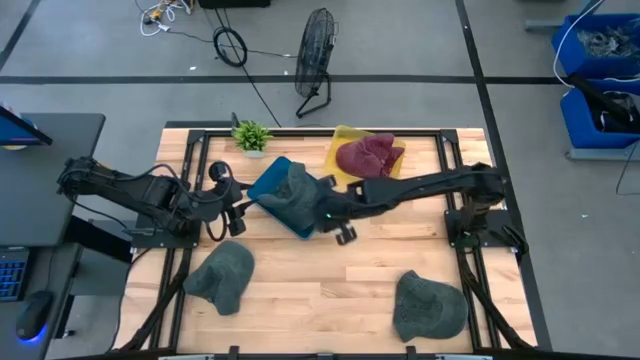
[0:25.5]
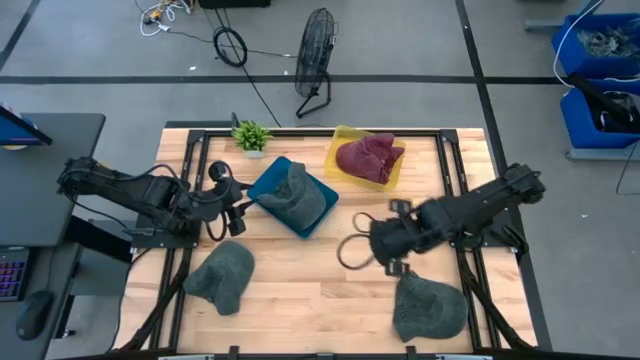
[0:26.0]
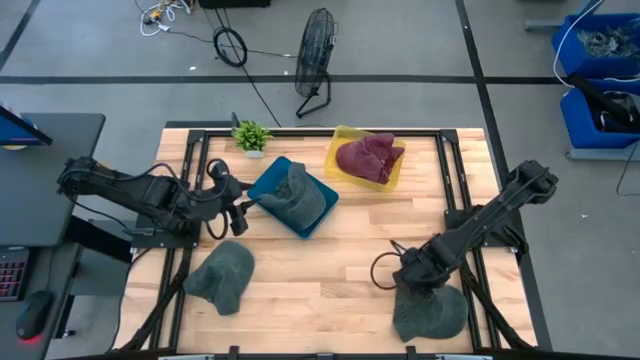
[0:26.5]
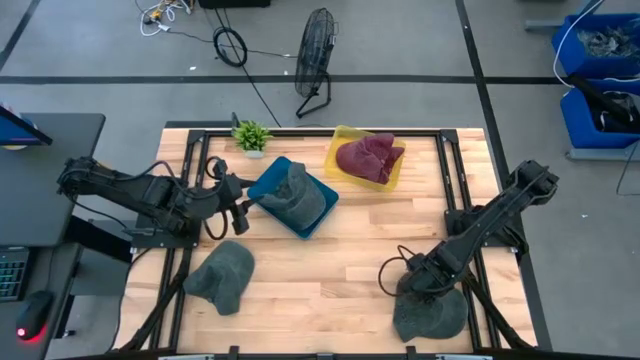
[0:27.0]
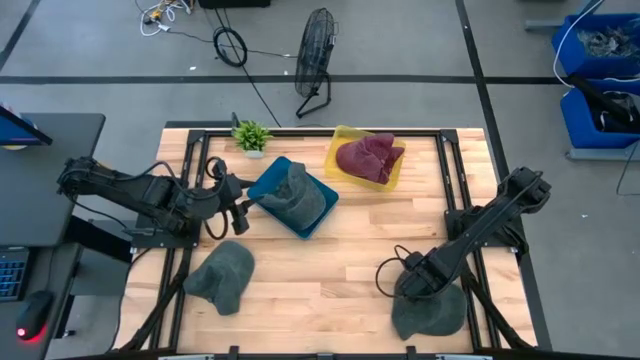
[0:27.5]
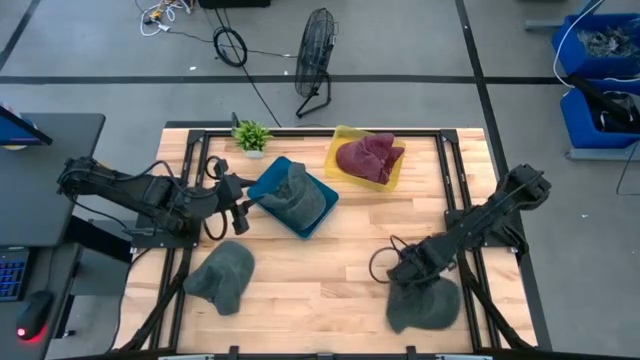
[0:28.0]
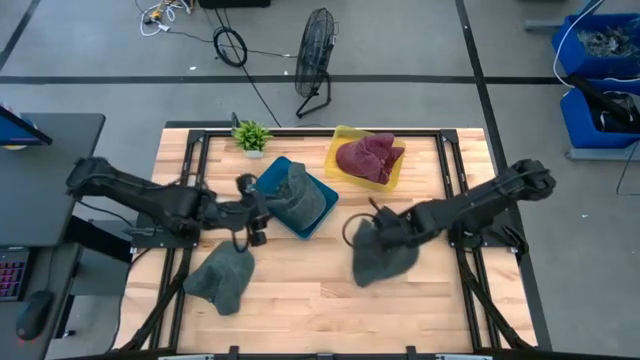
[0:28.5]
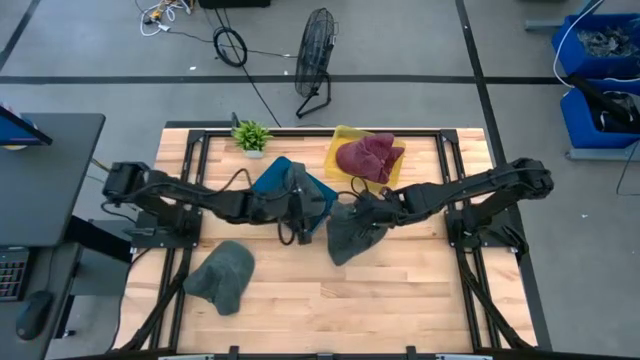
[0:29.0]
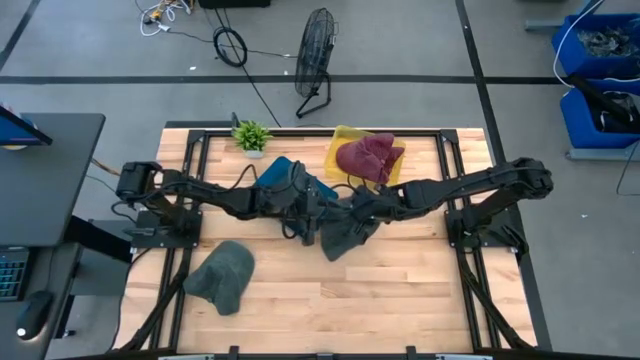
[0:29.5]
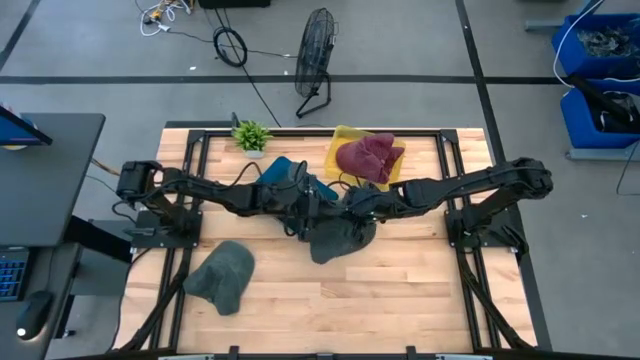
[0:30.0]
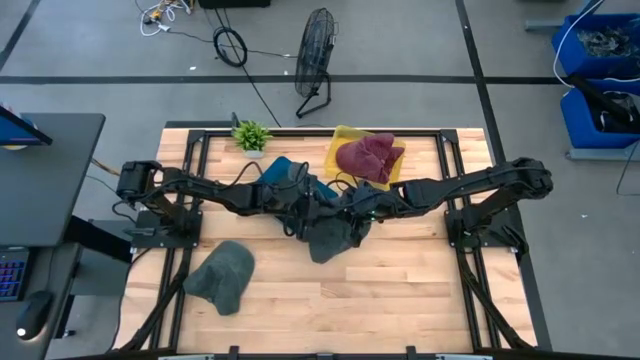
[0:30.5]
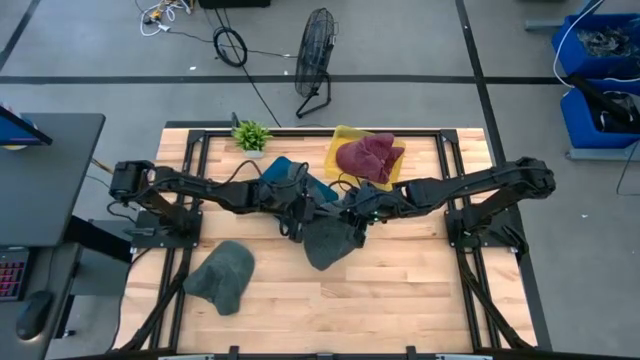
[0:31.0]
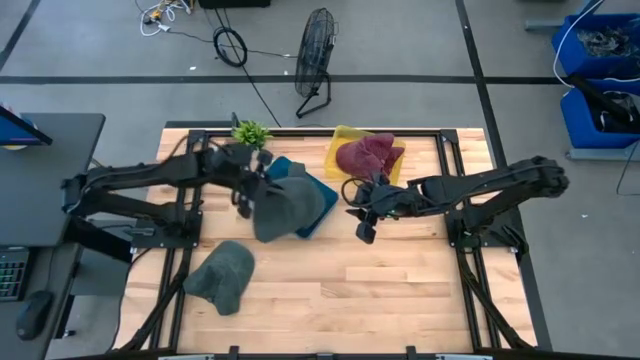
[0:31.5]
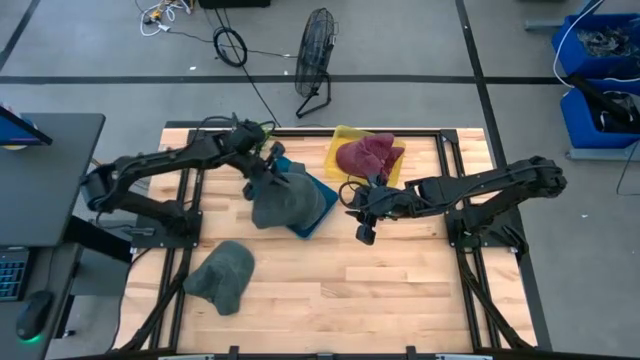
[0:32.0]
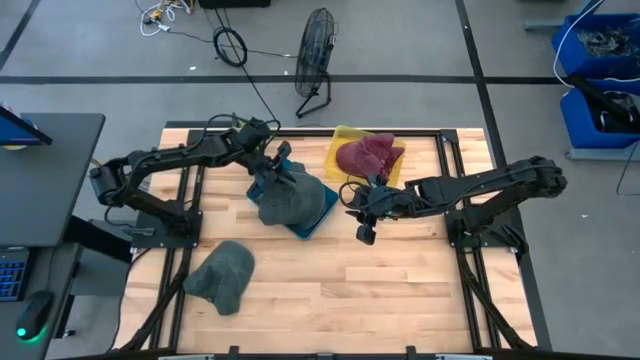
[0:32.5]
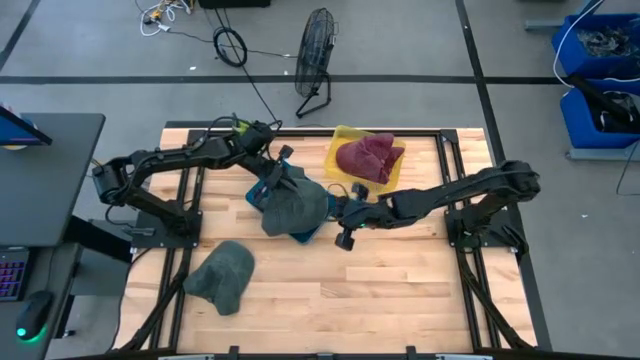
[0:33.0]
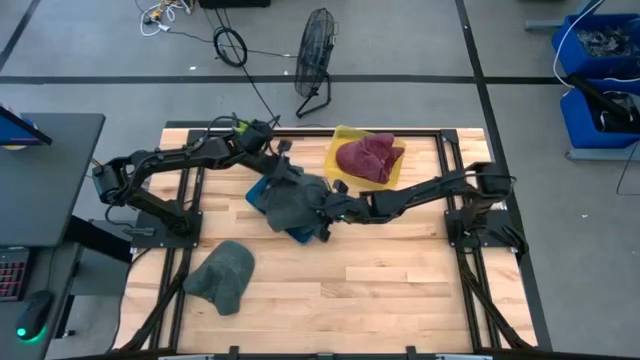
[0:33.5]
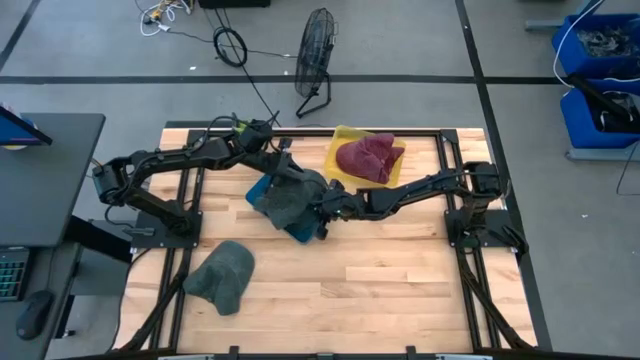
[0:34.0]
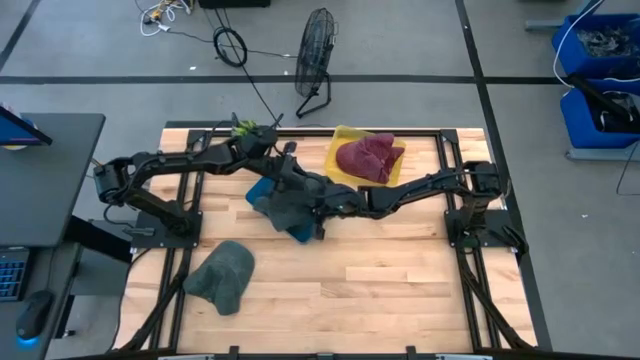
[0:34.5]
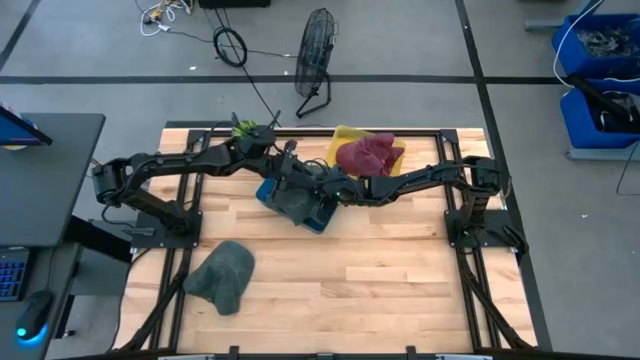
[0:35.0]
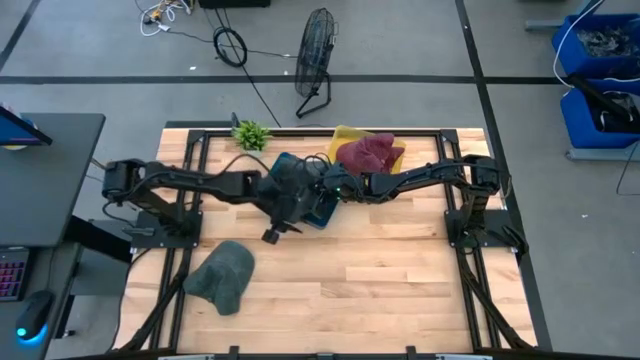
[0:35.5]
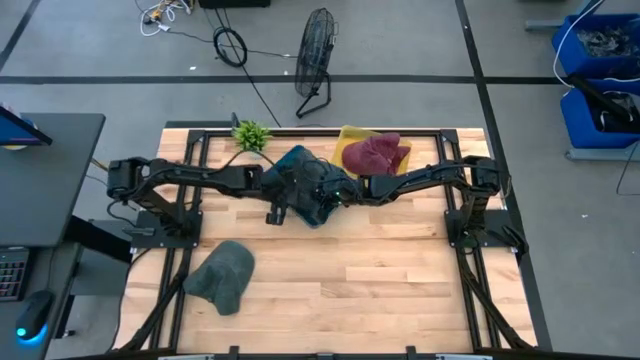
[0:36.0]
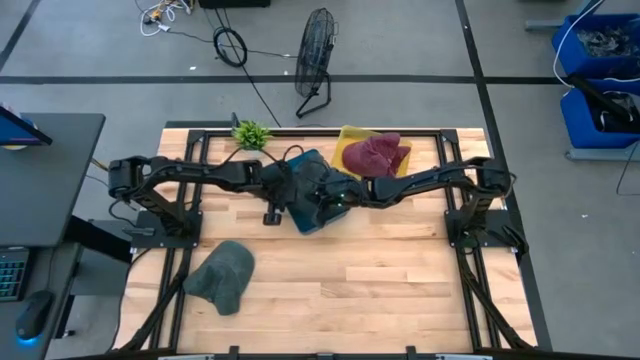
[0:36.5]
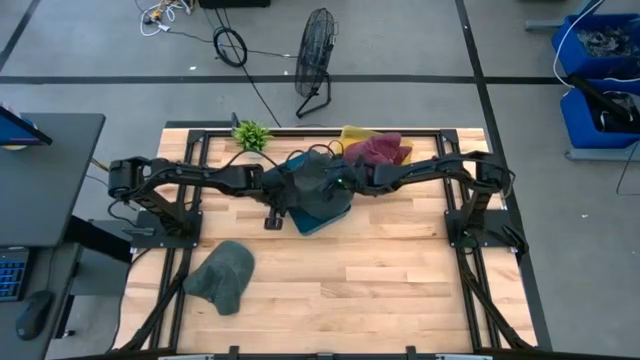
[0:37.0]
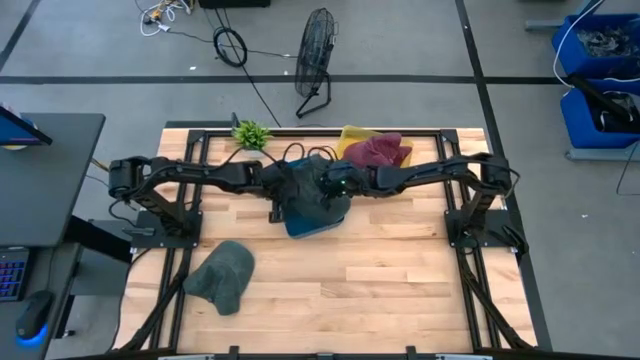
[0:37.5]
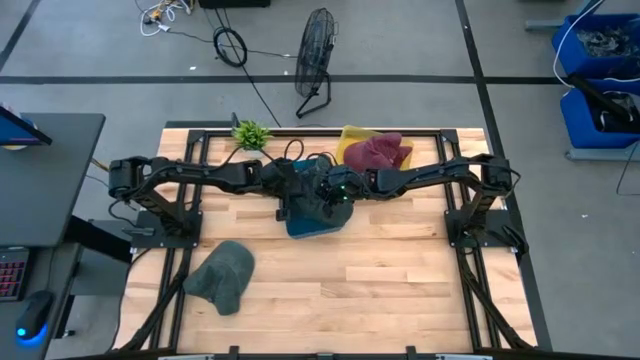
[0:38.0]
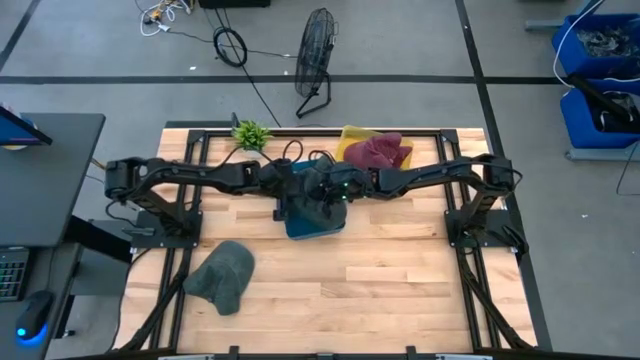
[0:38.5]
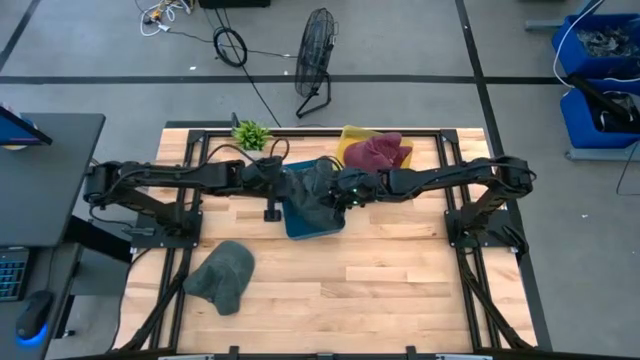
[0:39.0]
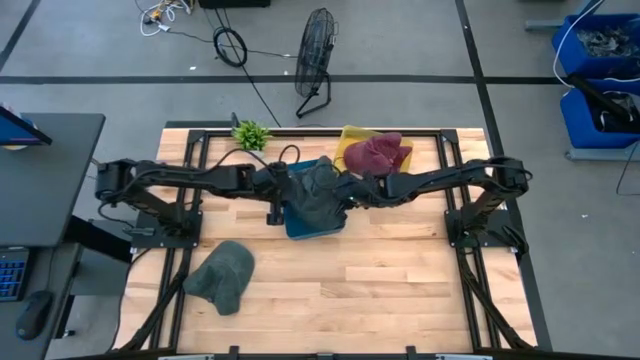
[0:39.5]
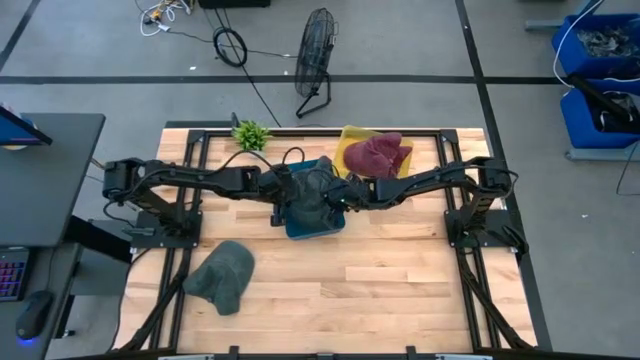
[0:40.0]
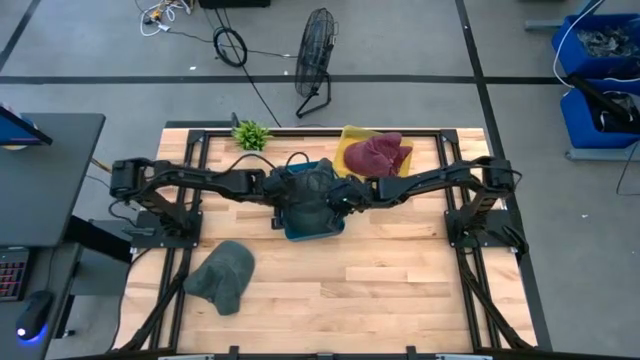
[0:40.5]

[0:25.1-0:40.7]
Task: Pick & Place hat
Put the right black cap into the blue bin

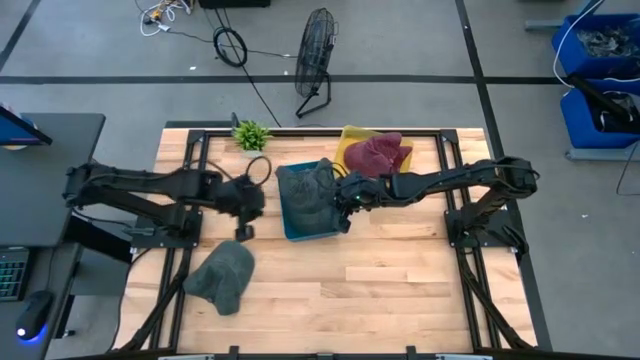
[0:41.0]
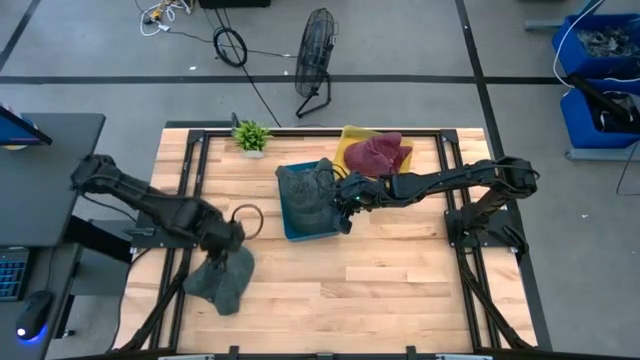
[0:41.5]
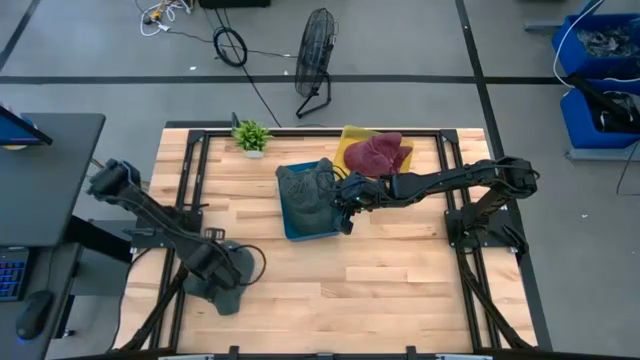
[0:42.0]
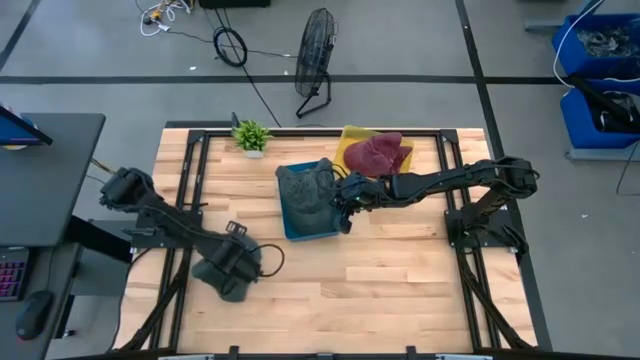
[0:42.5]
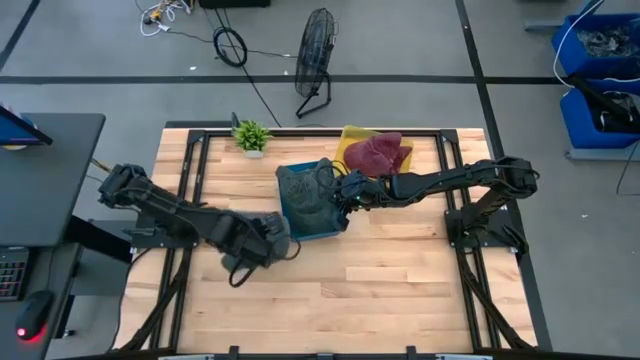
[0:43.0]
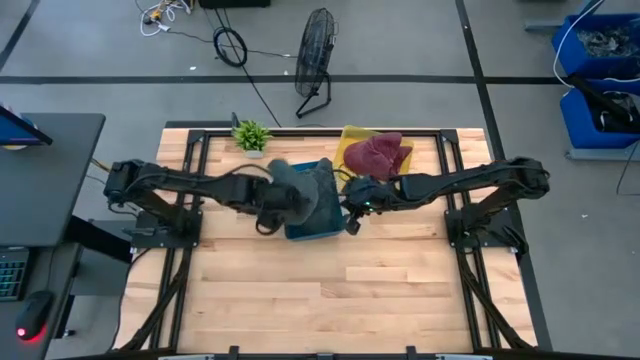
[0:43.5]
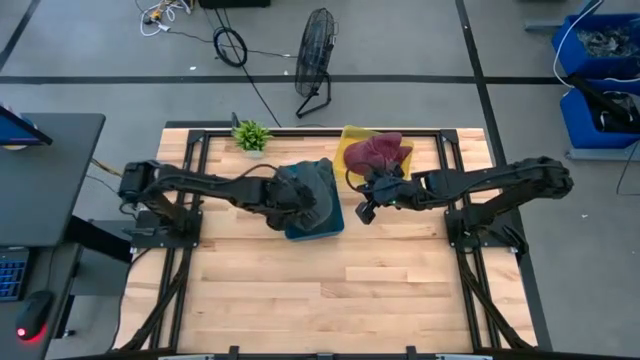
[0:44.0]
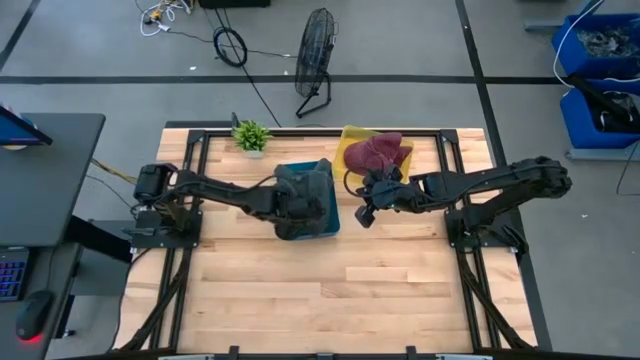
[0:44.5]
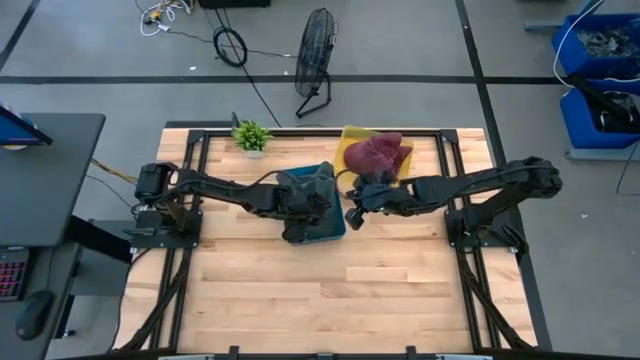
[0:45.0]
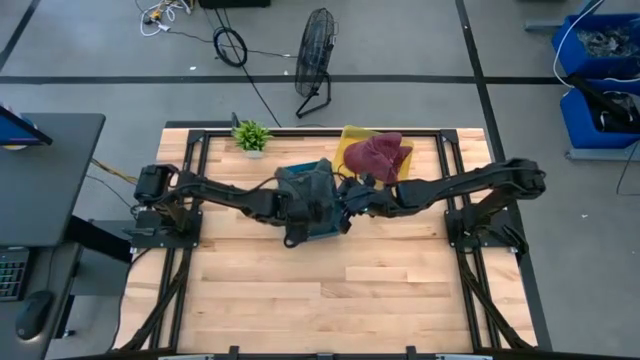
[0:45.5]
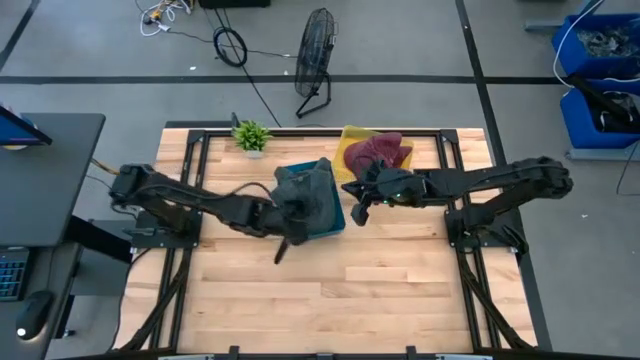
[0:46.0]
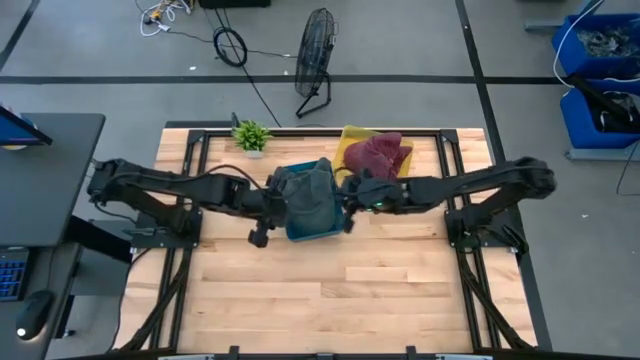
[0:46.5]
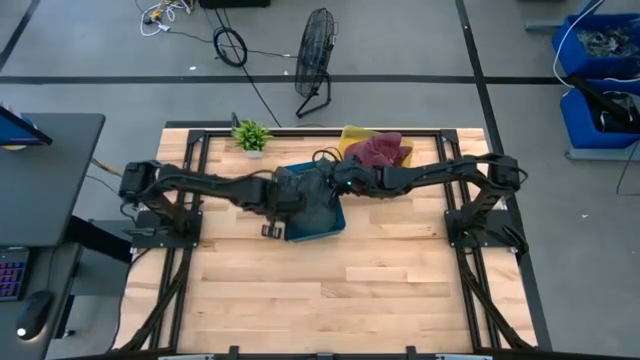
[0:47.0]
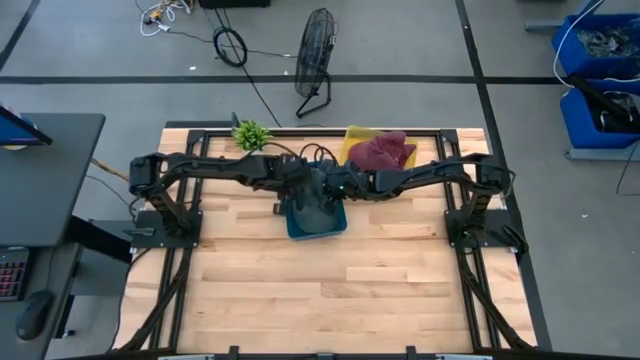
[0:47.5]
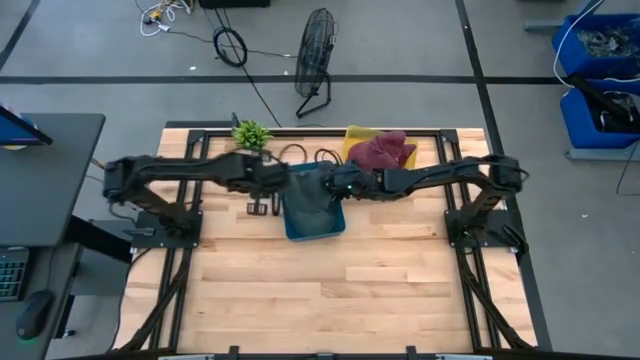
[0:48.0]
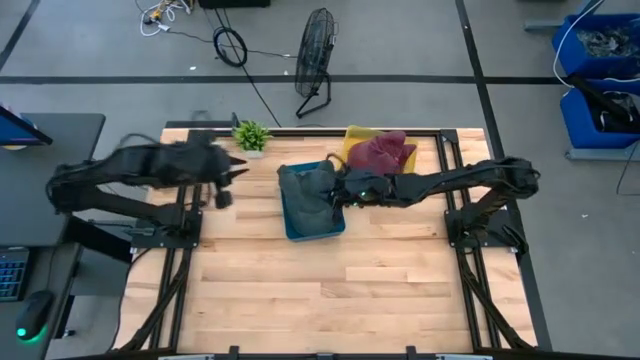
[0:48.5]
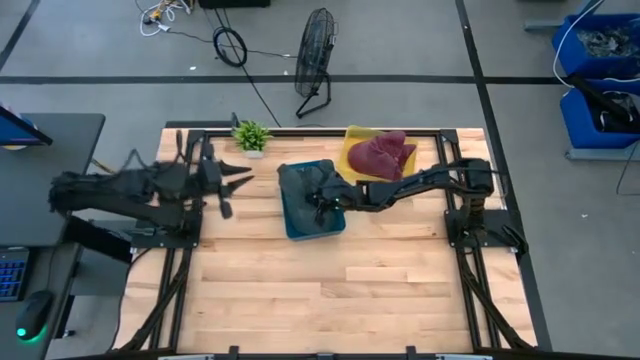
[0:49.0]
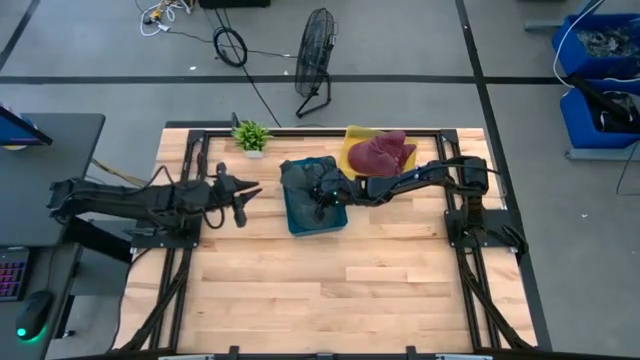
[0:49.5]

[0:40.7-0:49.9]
Put the black cap into the blue bin
